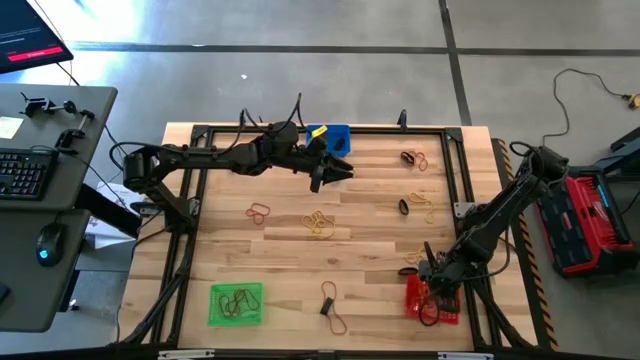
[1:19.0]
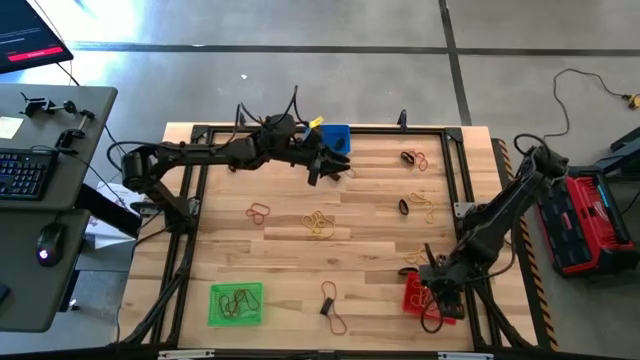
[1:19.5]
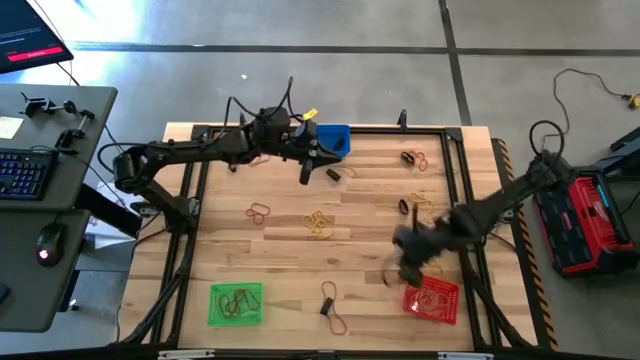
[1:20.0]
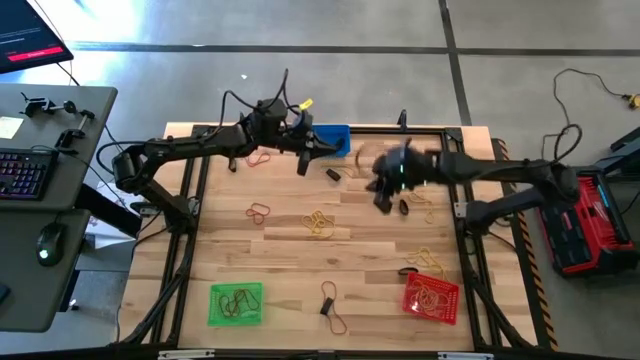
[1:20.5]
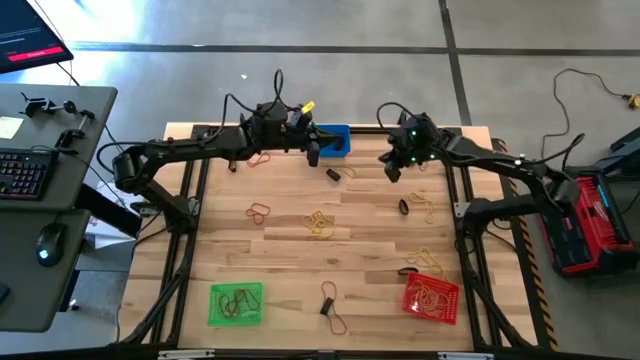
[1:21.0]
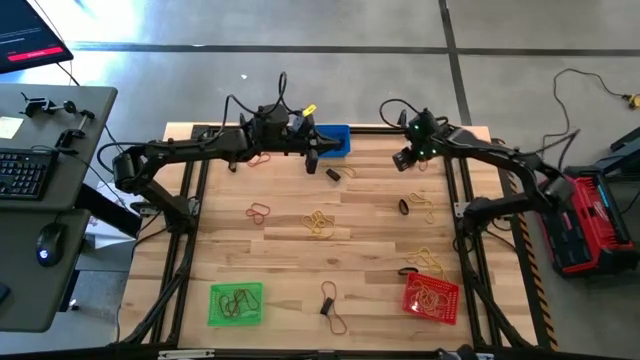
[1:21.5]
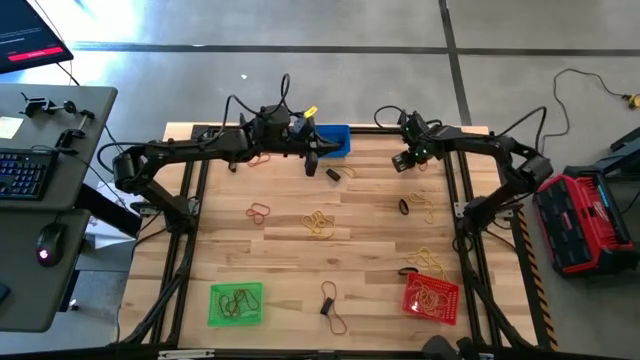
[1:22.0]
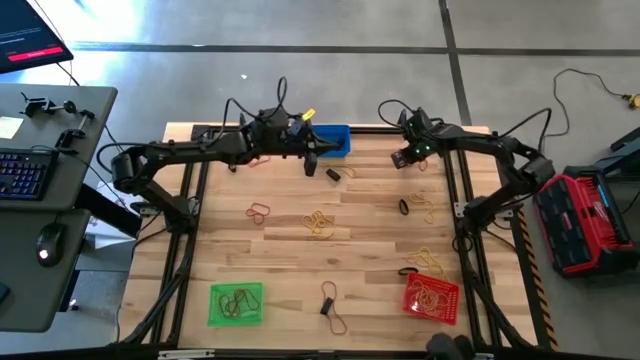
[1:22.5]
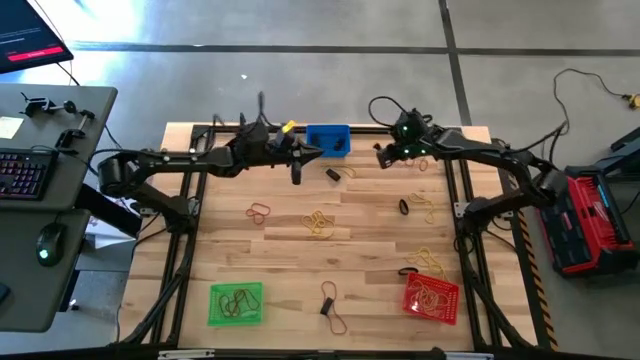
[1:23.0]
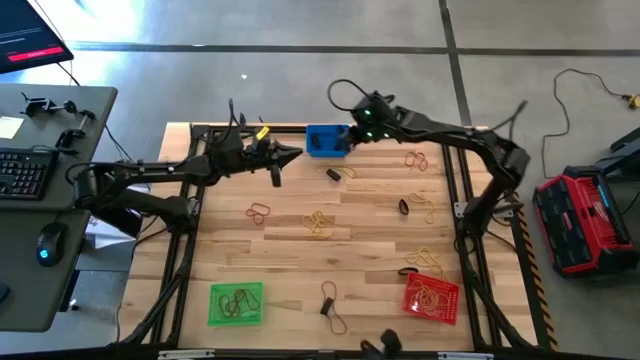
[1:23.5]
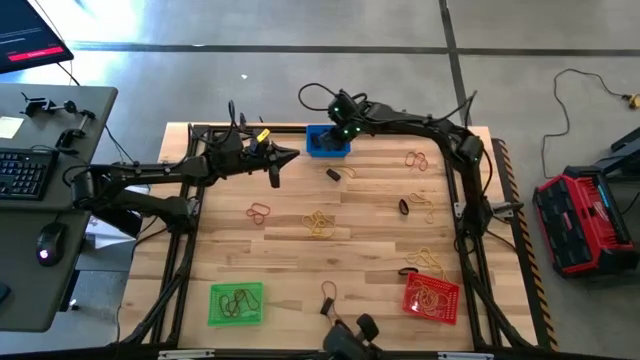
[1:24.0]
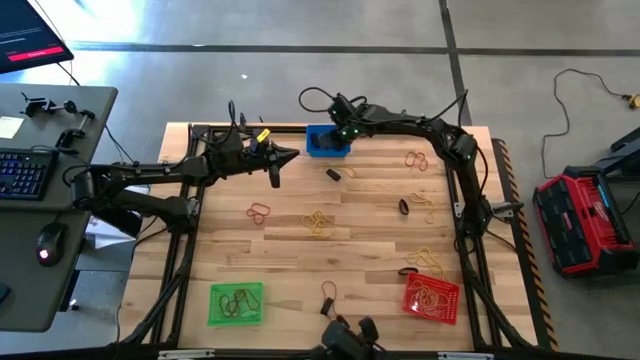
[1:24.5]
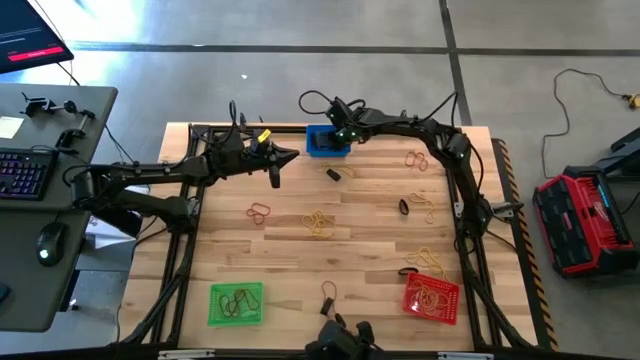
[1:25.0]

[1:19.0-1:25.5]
Task: Sort rubber bands into baskets
Put the black rubber band into the blue basket

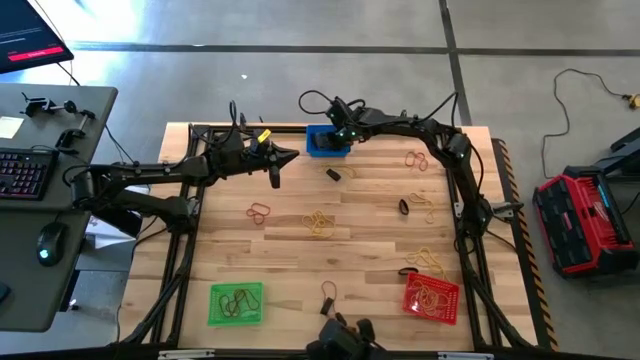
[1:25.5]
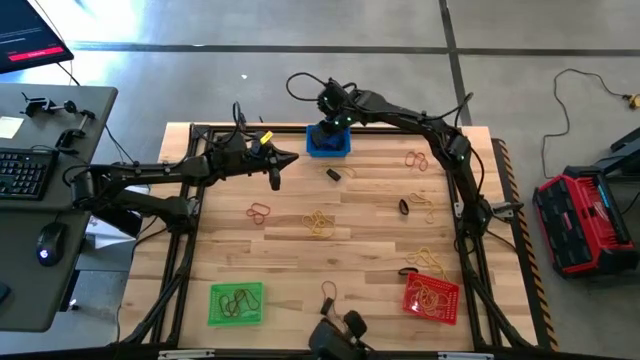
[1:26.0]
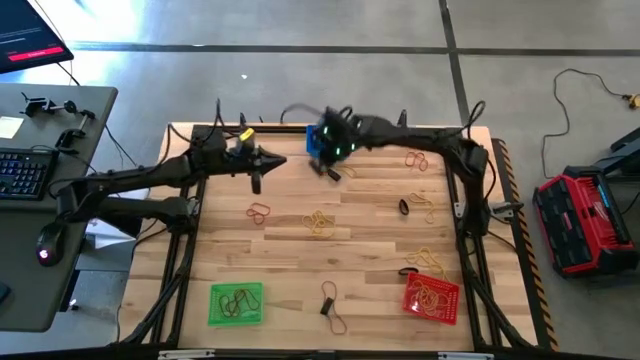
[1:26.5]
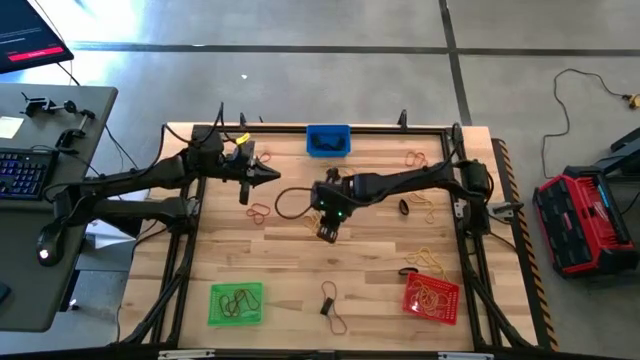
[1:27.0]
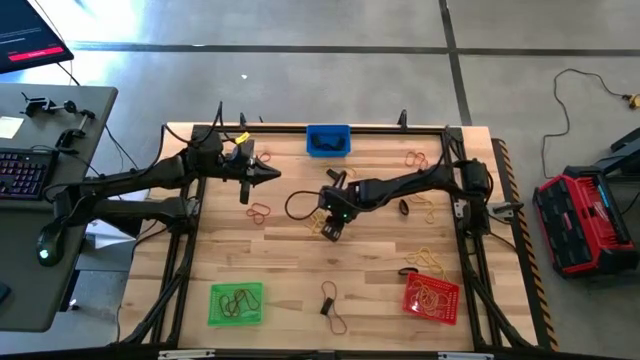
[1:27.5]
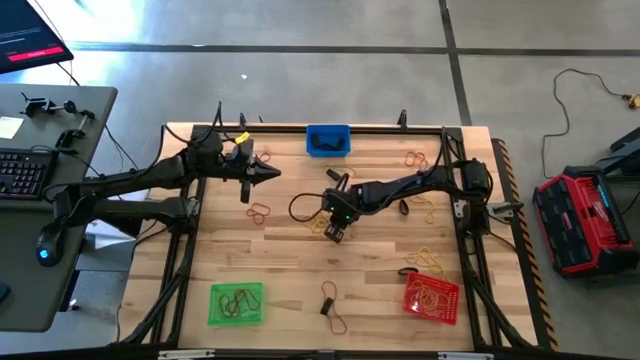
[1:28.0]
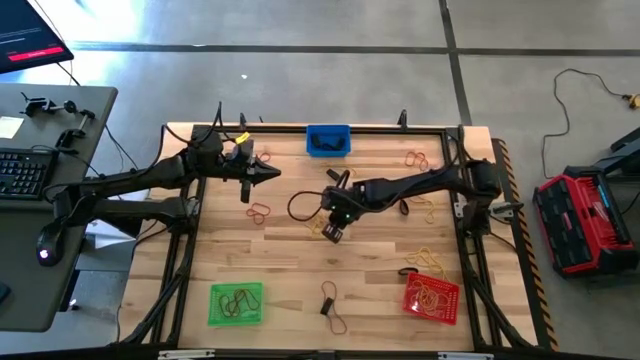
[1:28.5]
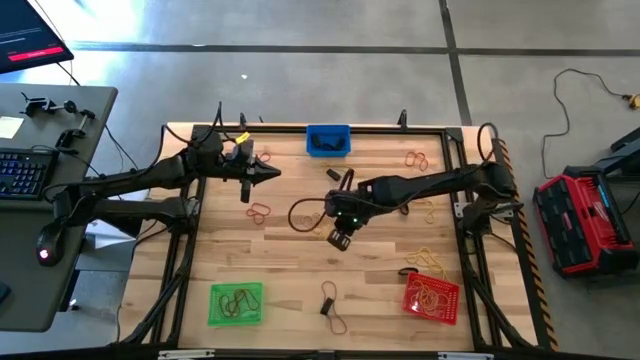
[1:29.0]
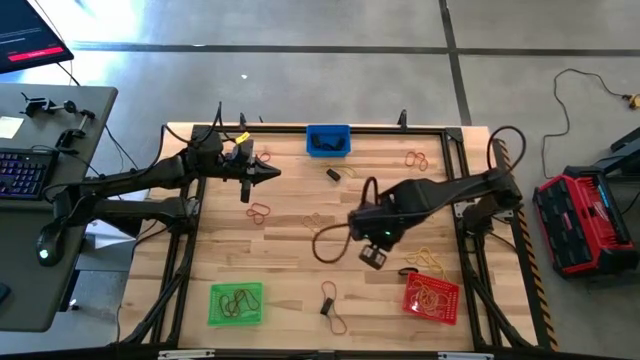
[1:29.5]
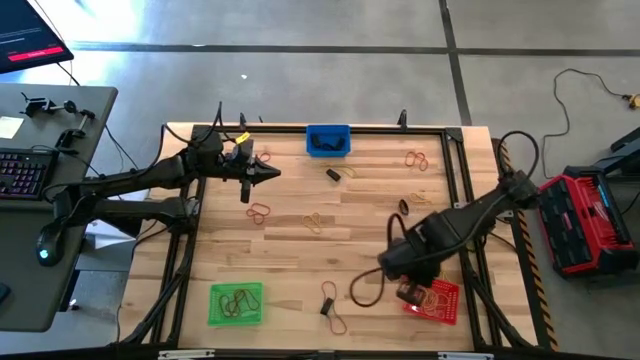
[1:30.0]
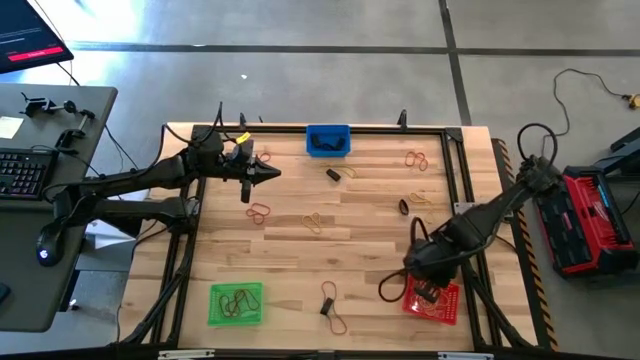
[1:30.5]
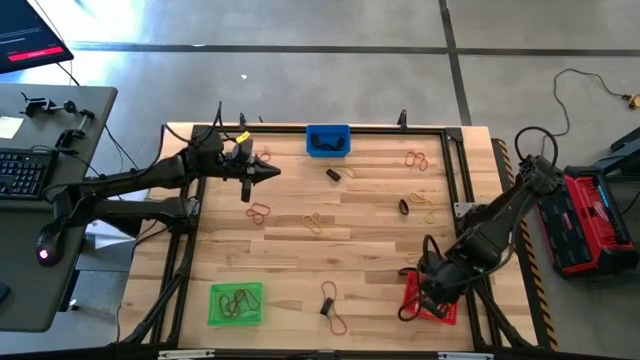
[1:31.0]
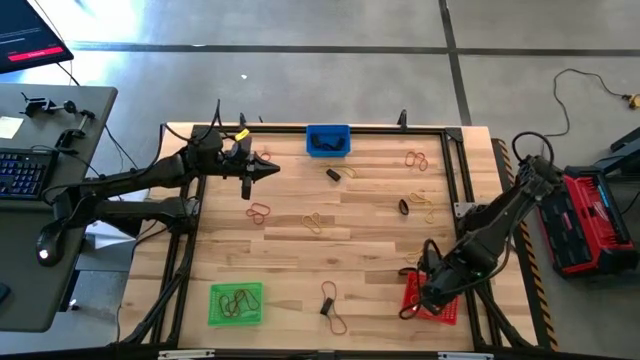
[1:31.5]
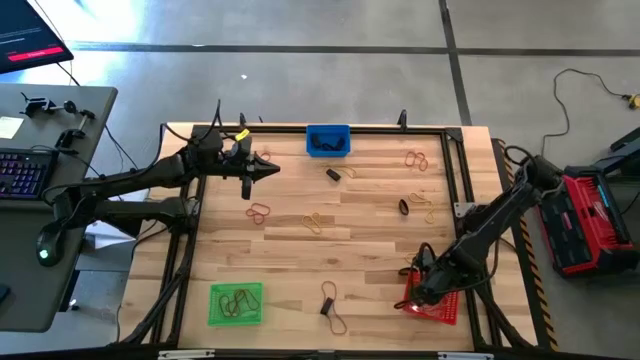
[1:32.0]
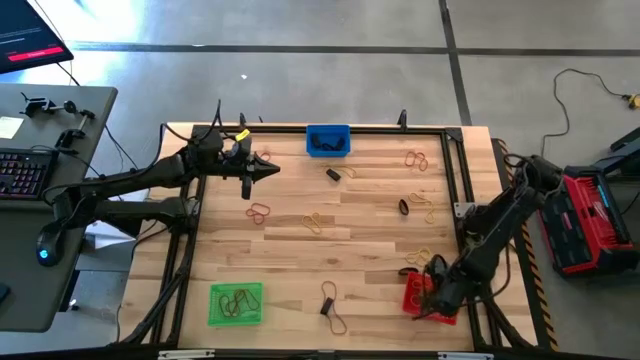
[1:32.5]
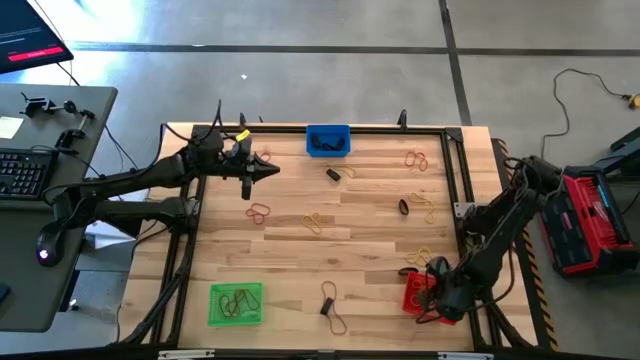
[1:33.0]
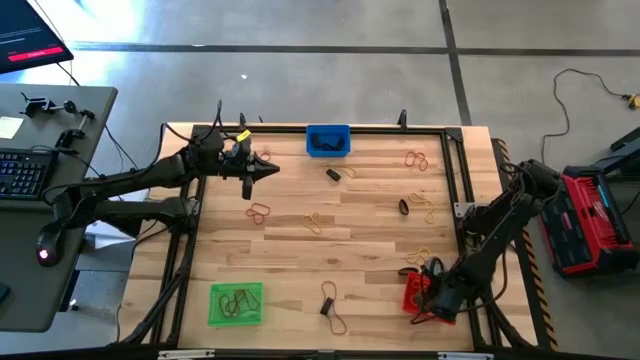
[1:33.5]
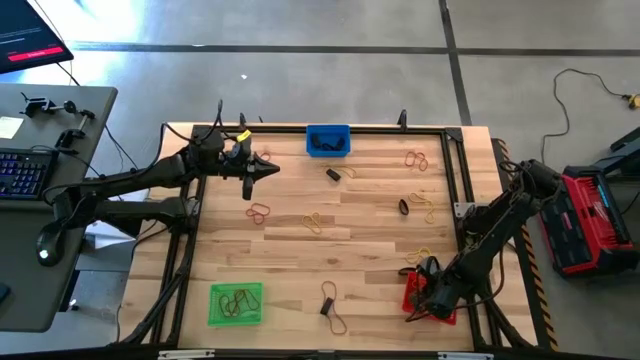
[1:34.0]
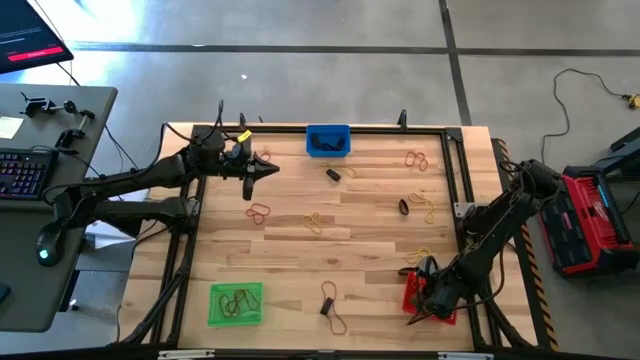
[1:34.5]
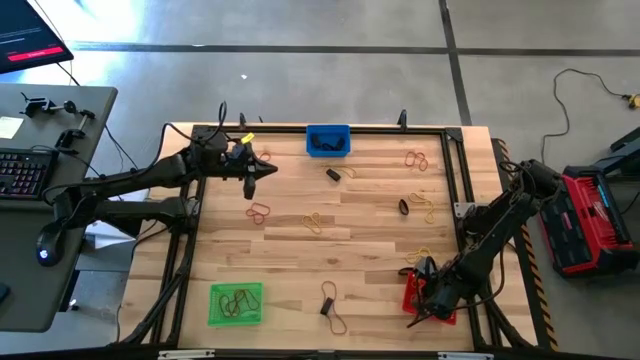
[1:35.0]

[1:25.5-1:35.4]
Put the yellow rubber band into the red basket
